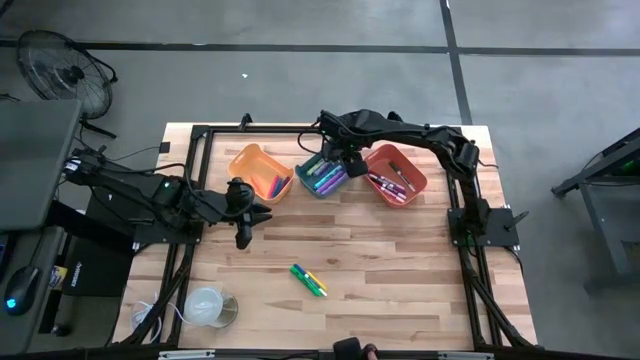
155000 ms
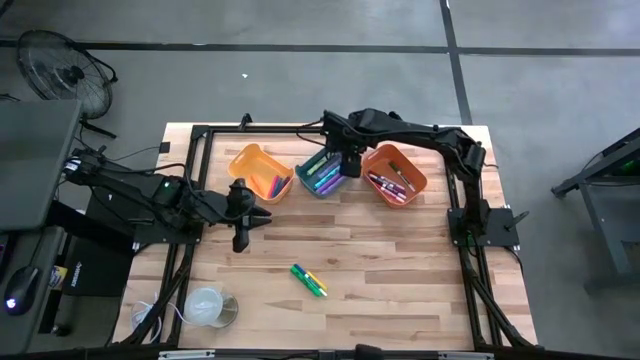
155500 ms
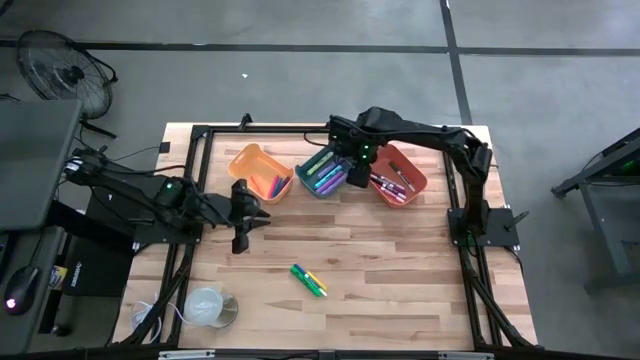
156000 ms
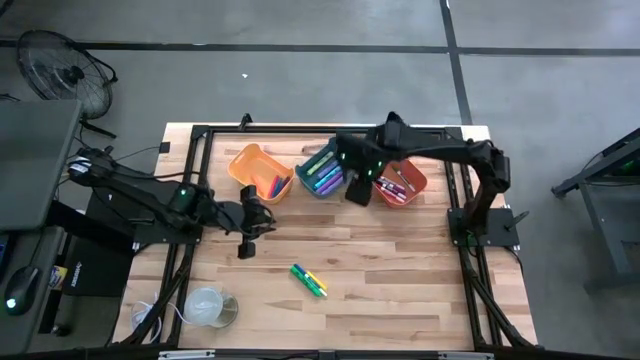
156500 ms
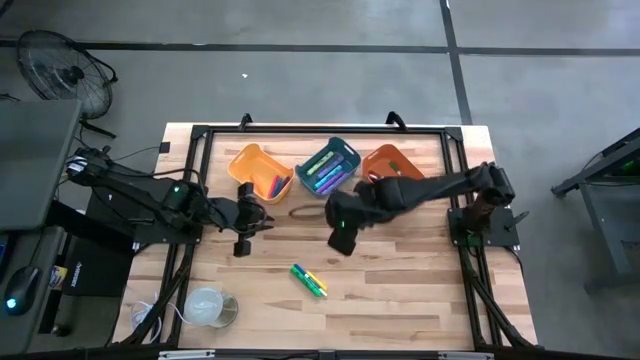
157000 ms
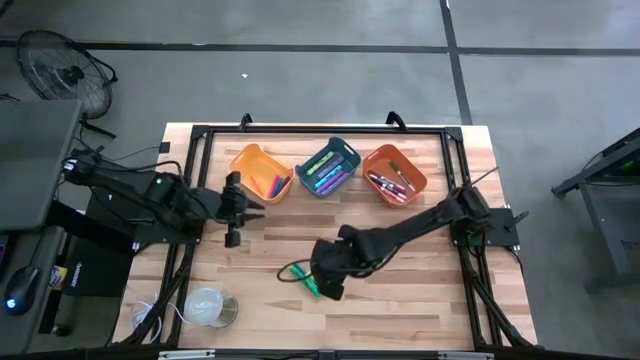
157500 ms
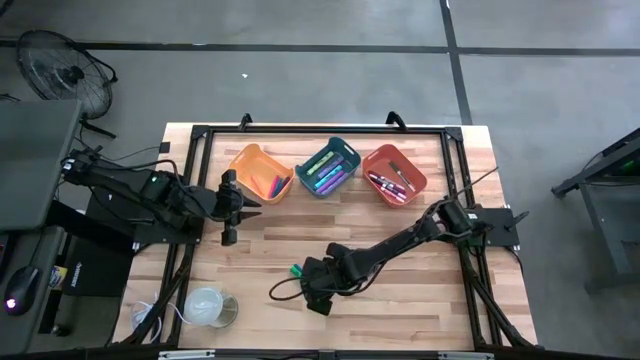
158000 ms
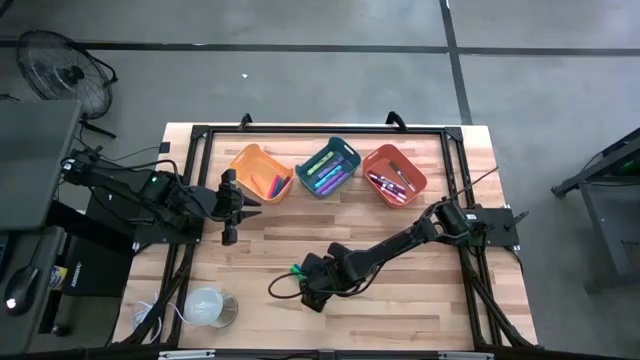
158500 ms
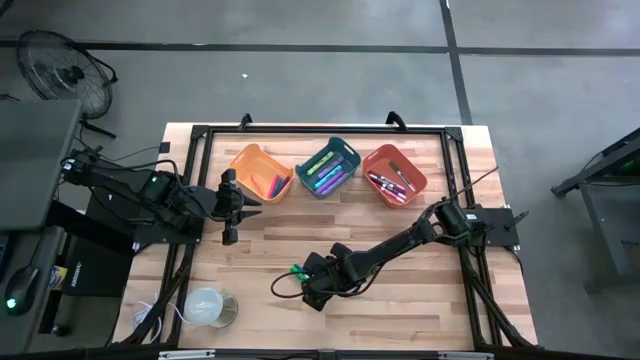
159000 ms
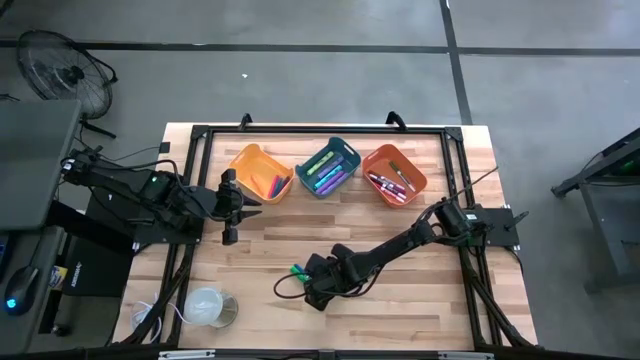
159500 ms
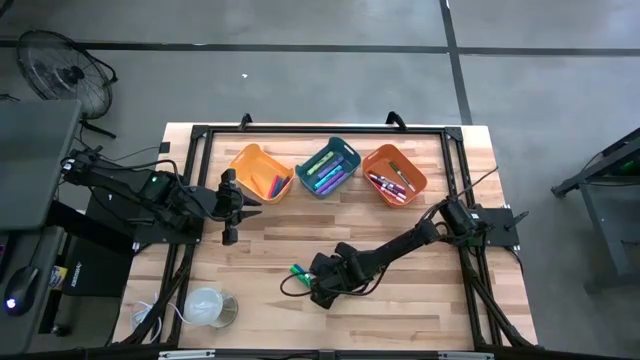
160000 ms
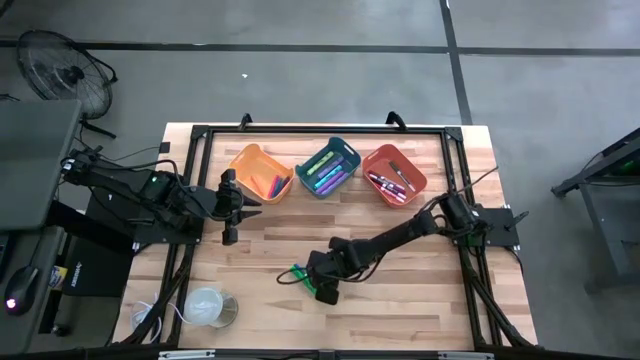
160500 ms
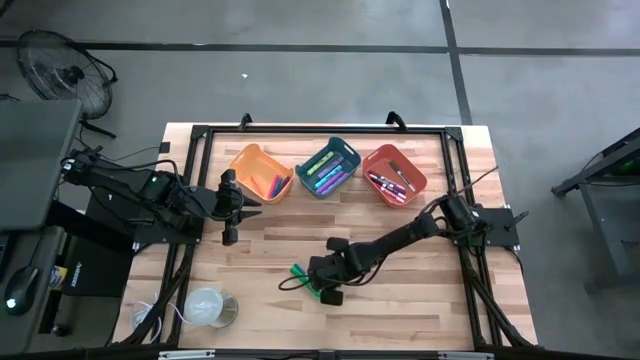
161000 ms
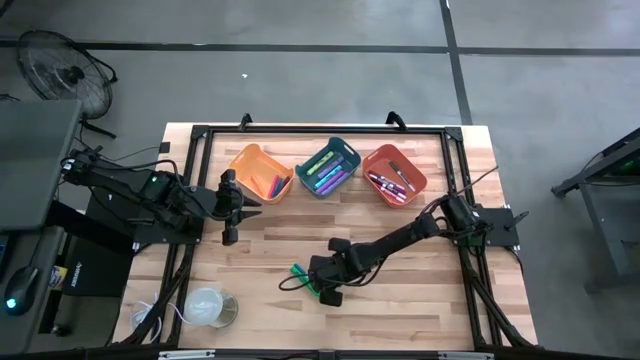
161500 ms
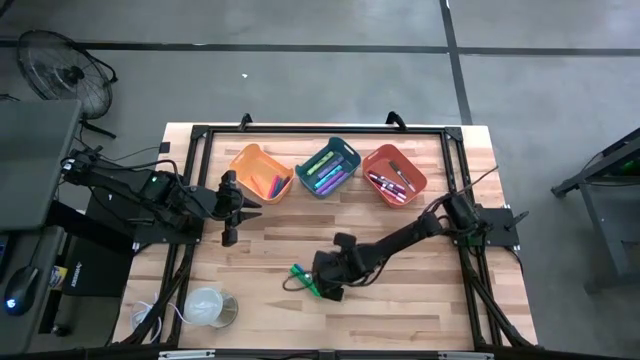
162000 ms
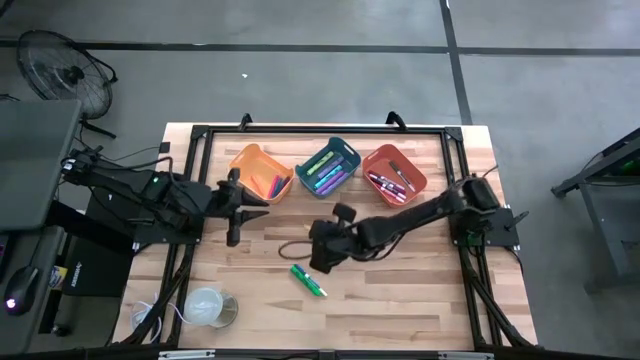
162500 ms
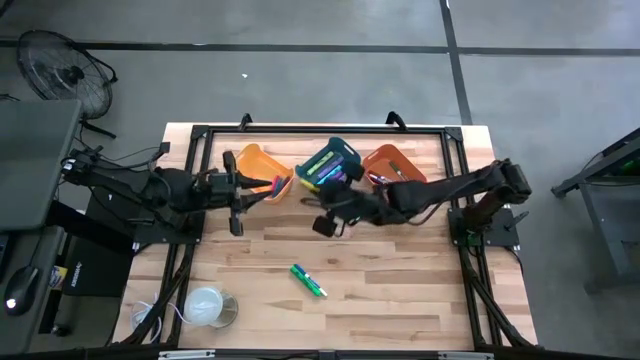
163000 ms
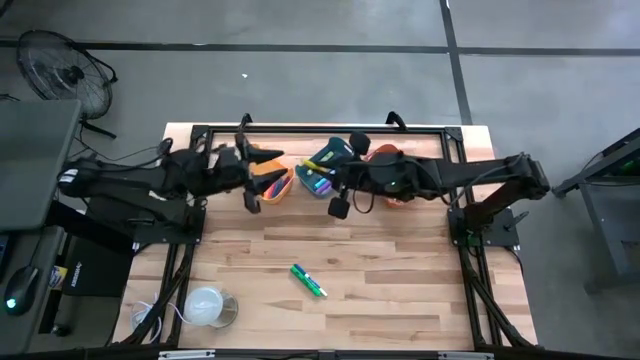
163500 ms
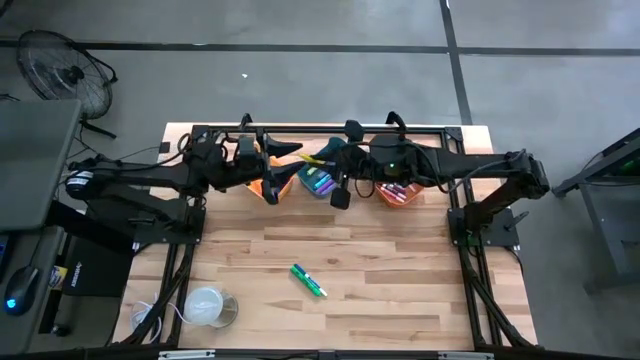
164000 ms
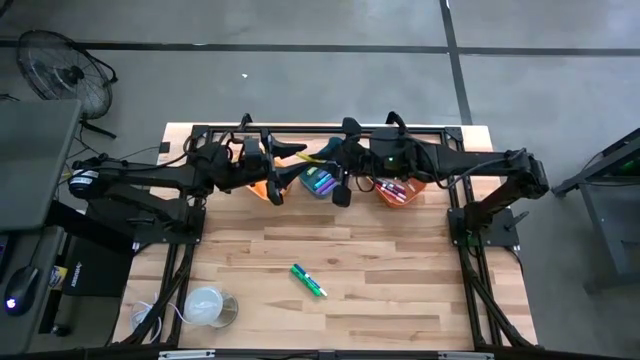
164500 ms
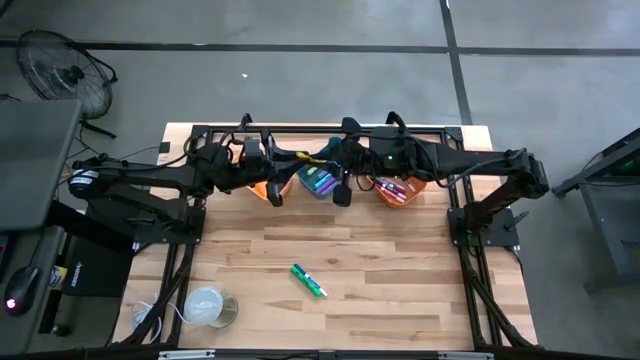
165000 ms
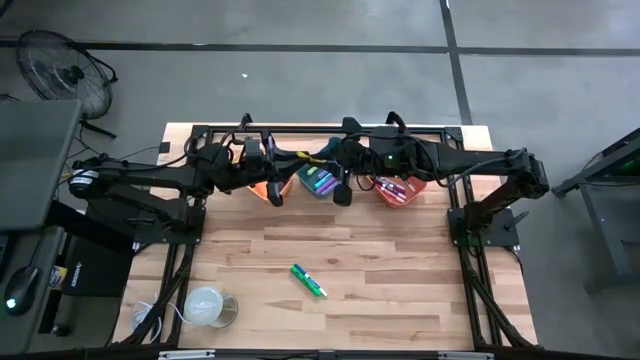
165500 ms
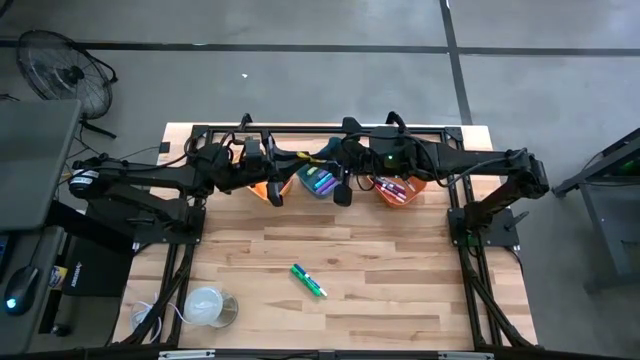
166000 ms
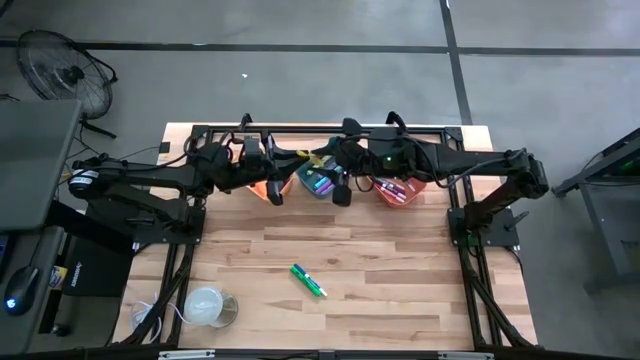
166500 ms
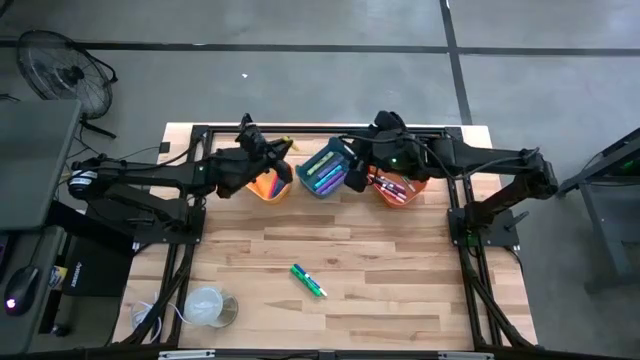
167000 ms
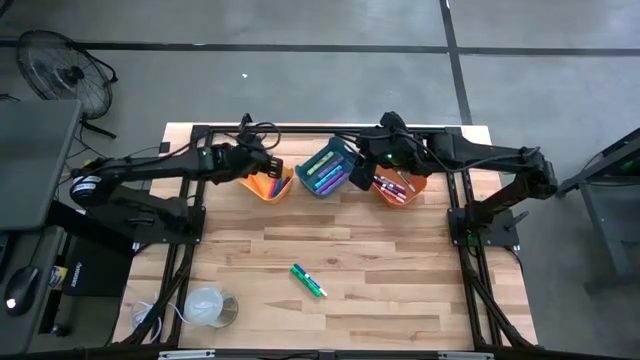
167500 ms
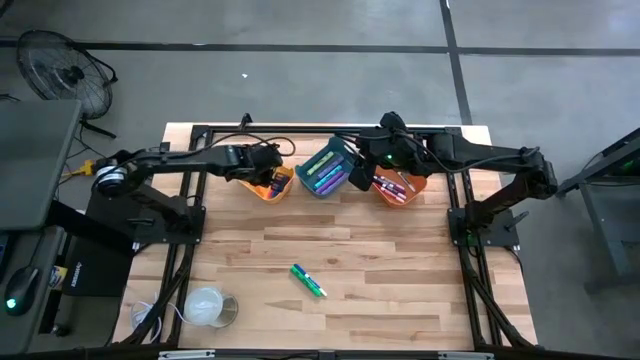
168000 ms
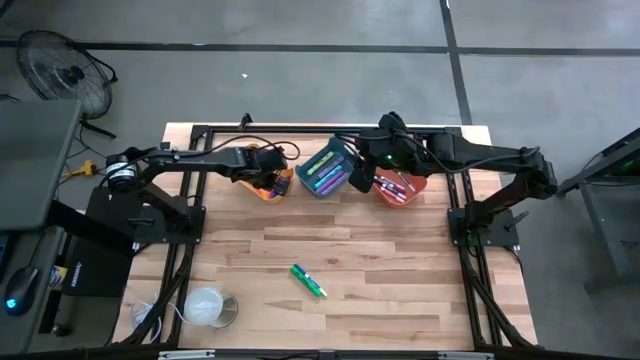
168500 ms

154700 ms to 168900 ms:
Task: Pick & Place Markers
Put the yellow pen into the yellow bin

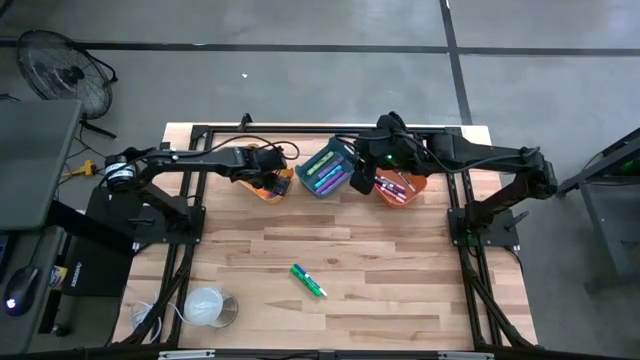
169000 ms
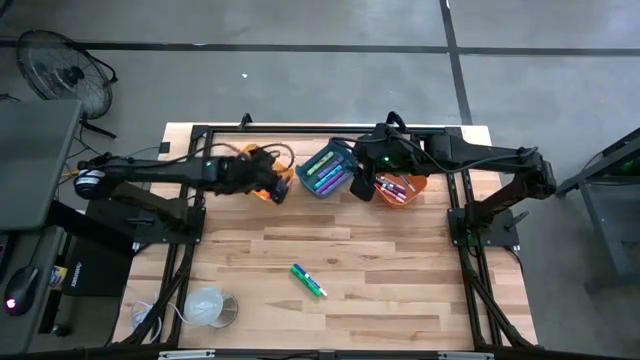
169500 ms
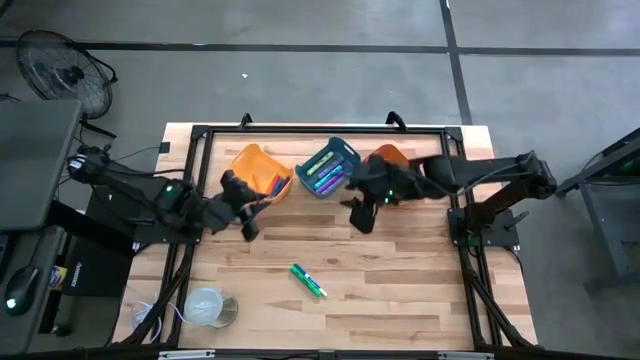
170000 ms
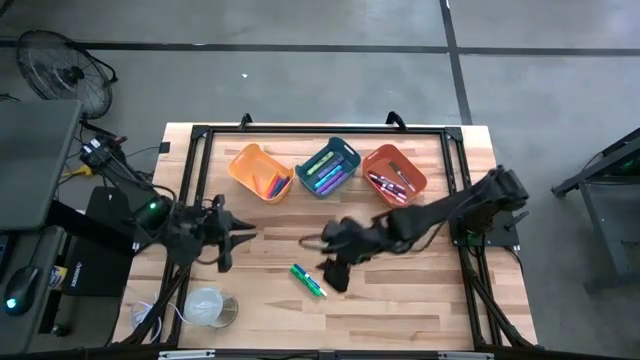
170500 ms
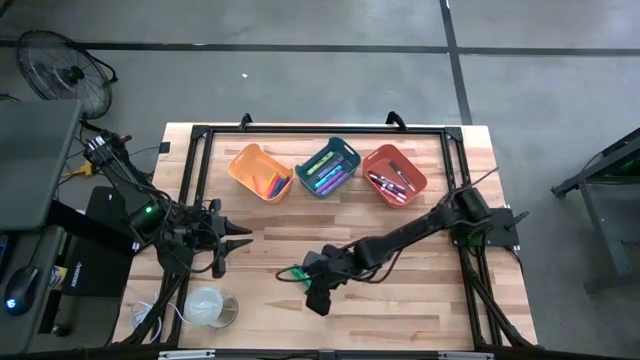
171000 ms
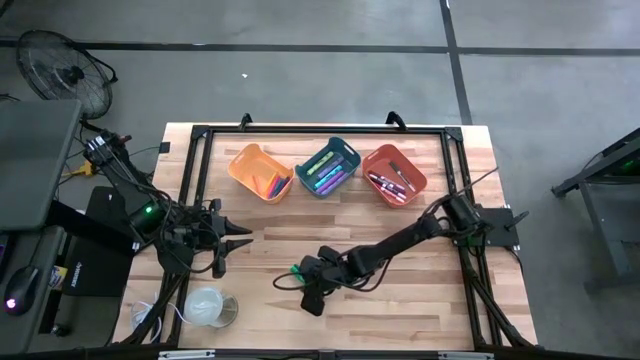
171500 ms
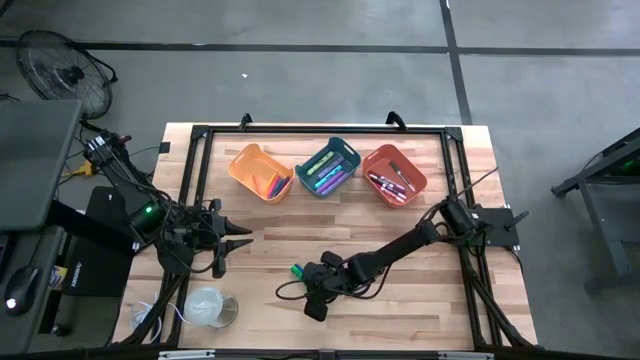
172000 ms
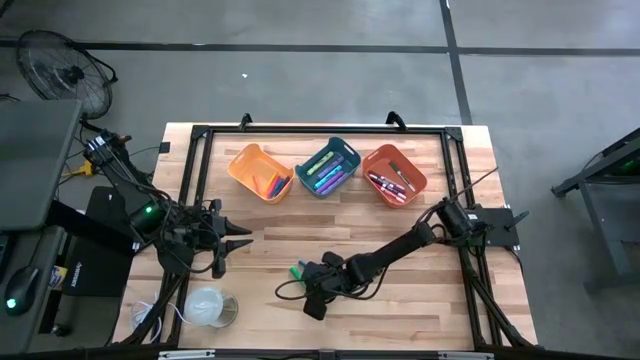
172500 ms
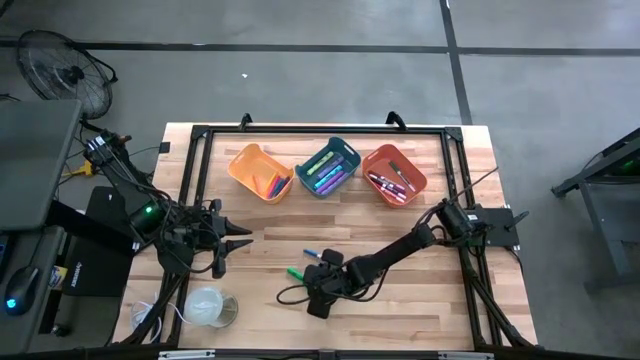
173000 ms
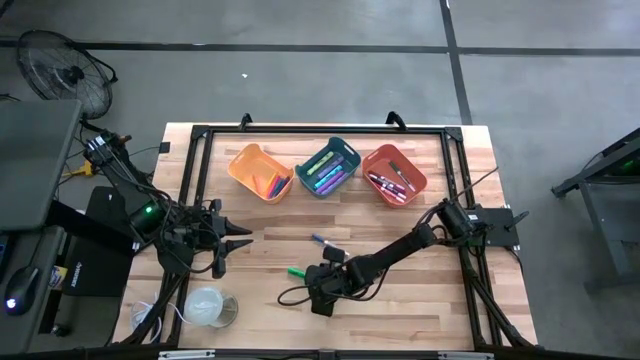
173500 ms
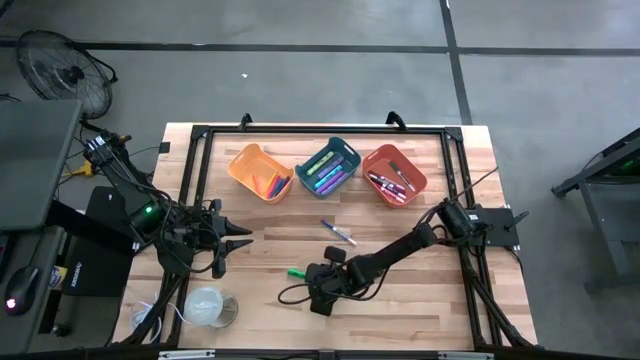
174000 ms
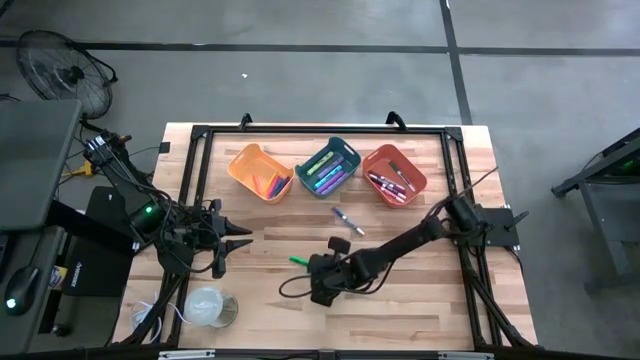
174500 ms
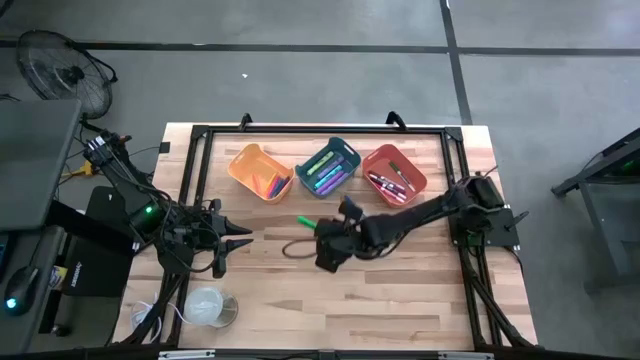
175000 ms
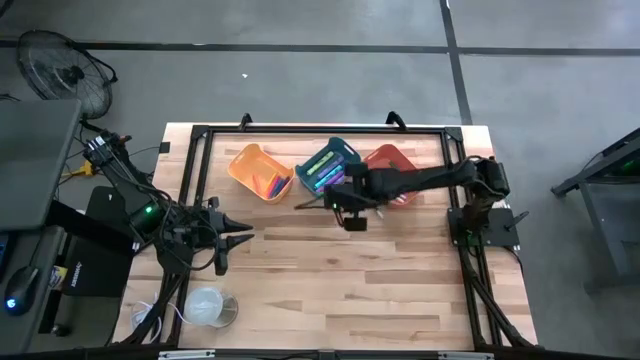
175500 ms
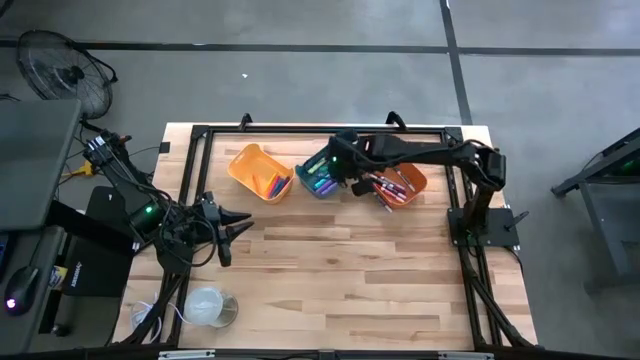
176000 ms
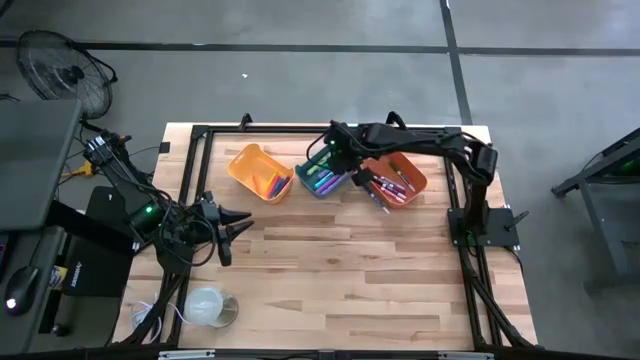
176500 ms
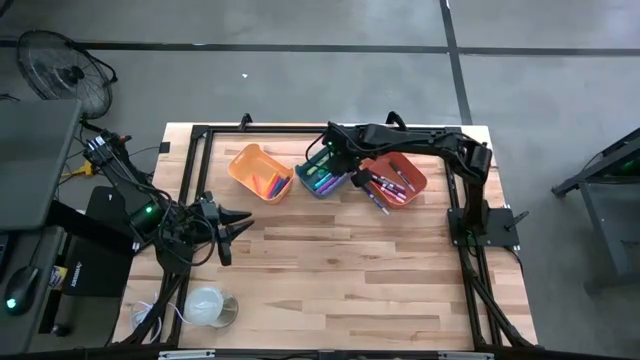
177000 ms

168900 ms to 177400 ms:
Put the green highlighter pen into the blue bin
